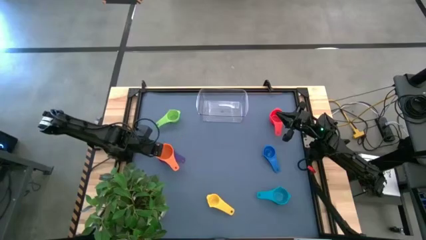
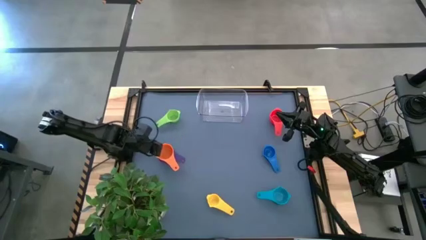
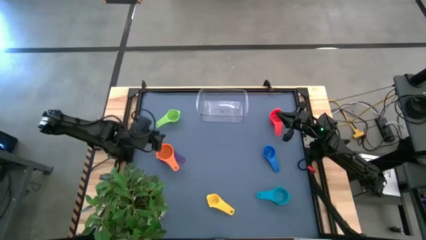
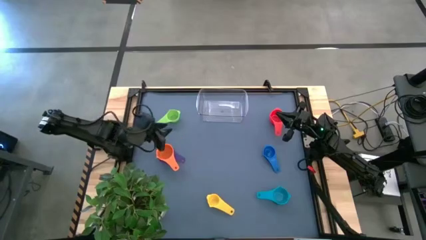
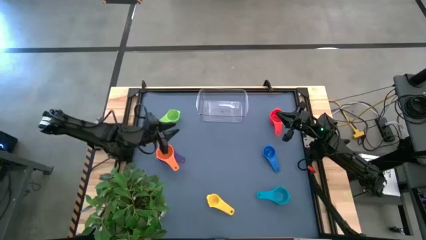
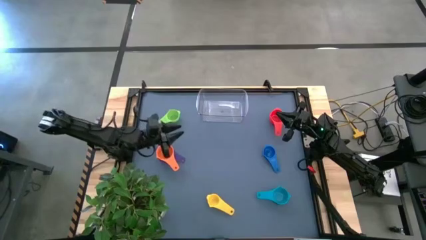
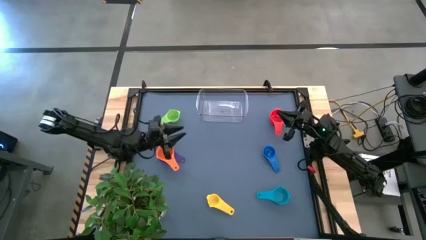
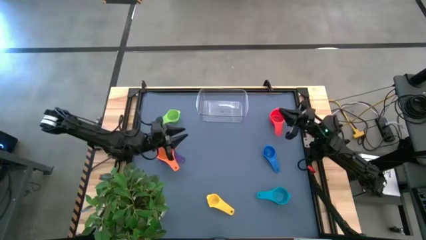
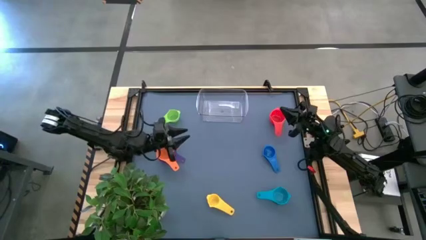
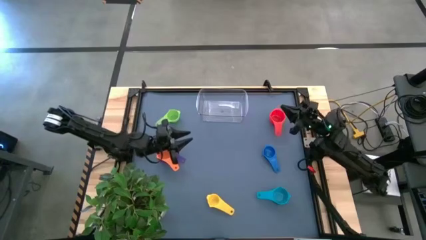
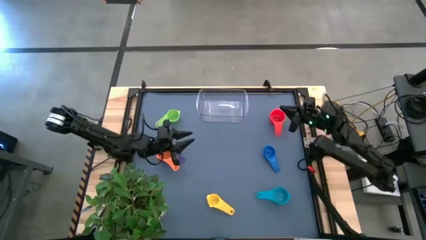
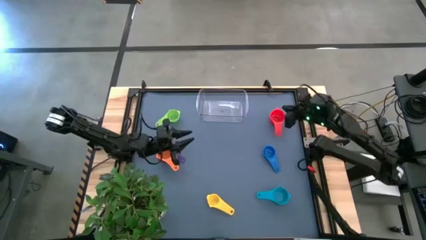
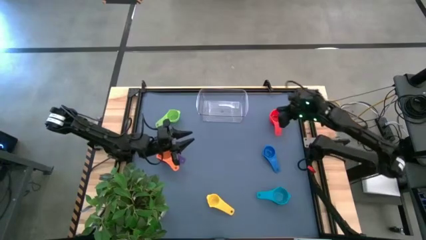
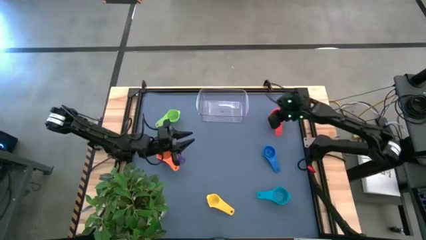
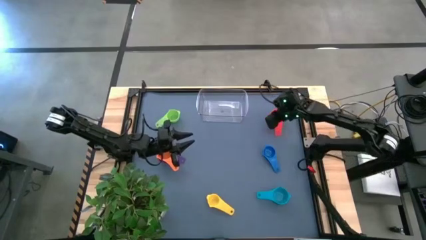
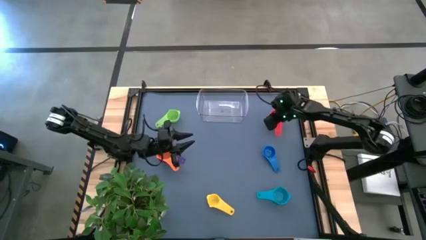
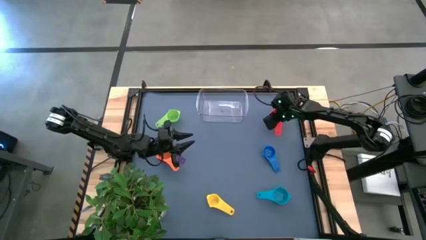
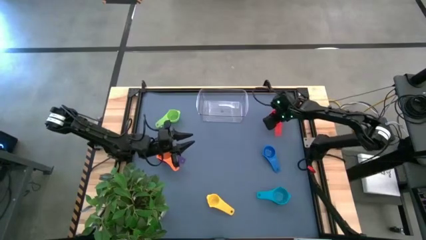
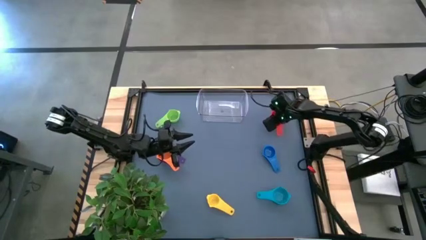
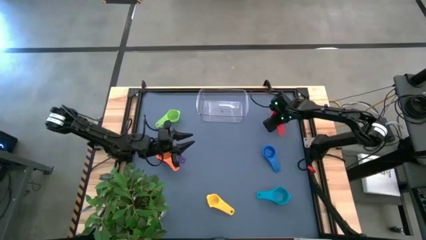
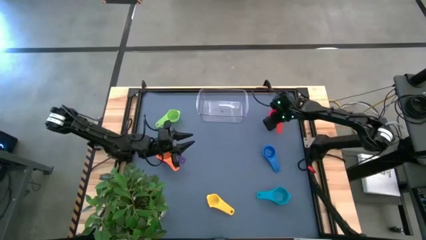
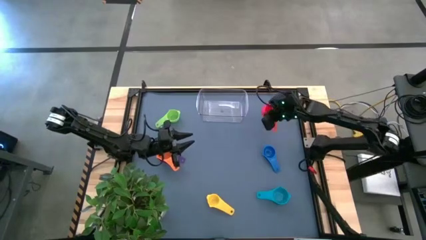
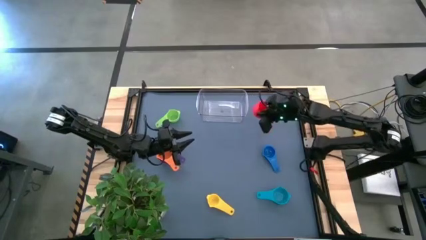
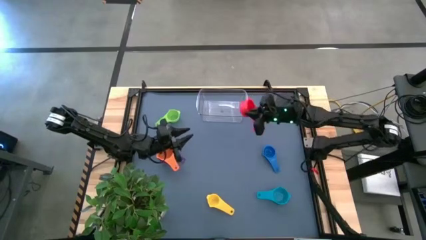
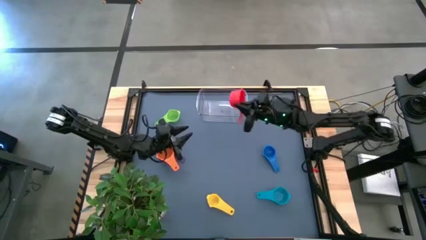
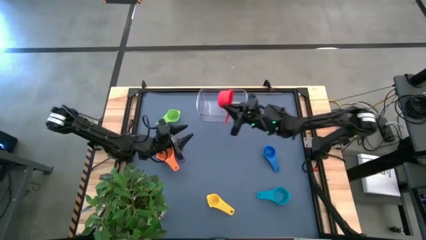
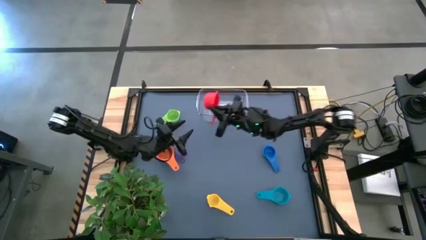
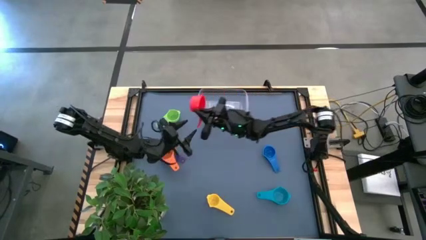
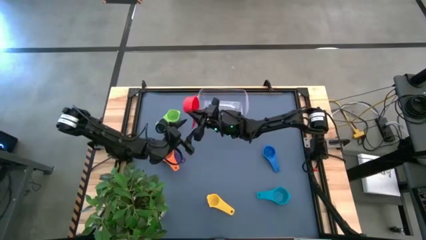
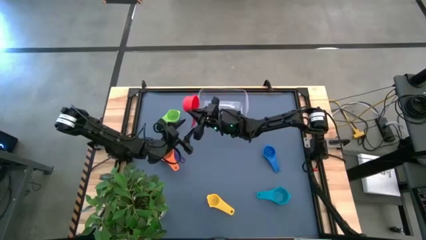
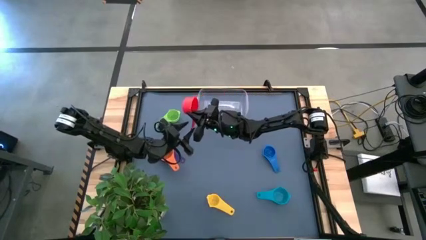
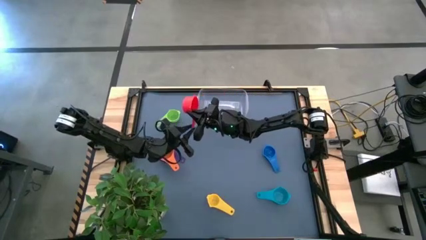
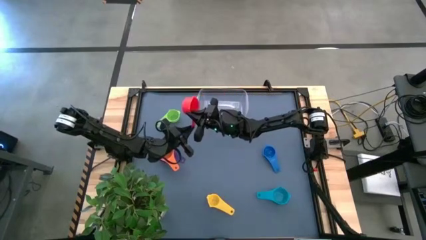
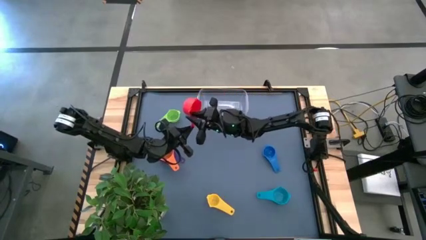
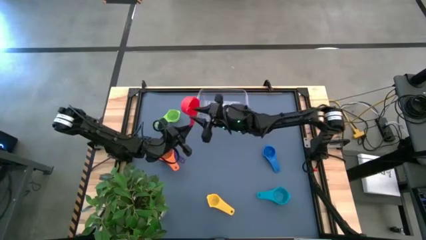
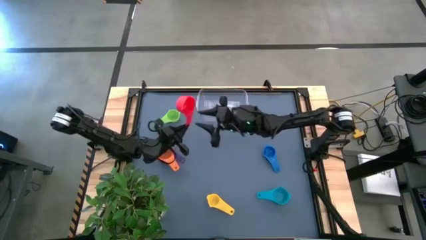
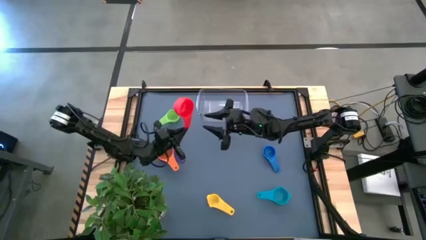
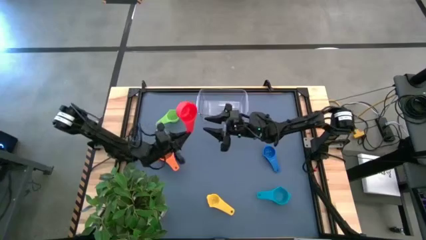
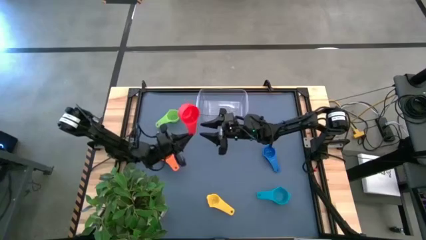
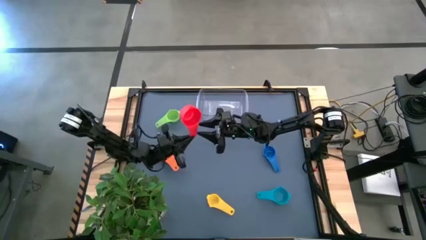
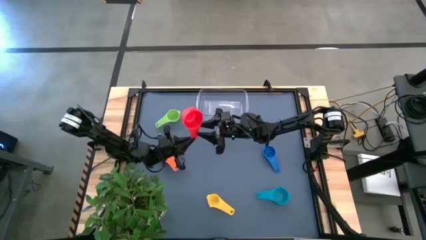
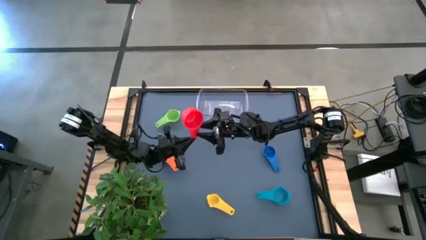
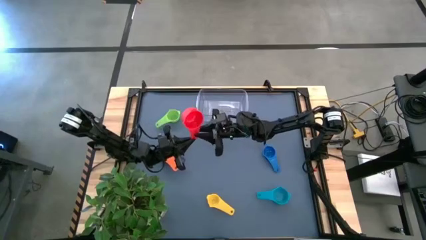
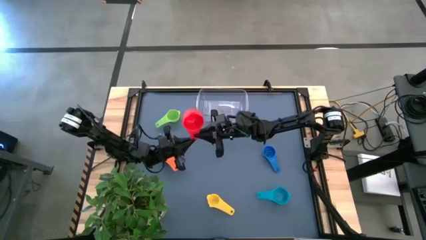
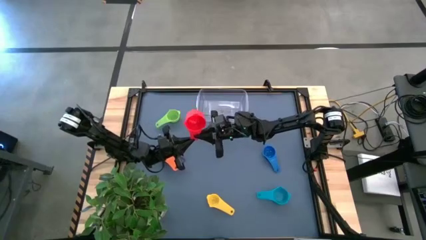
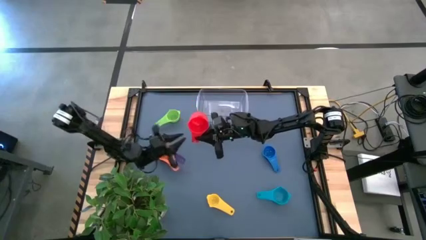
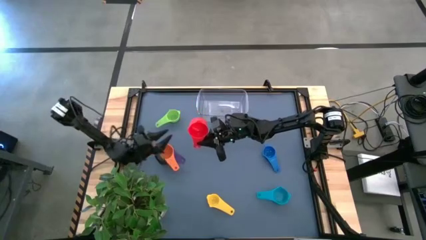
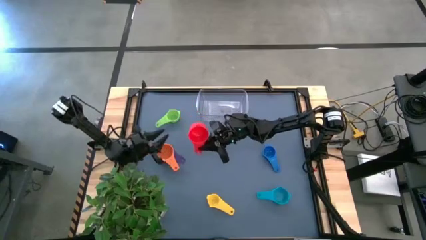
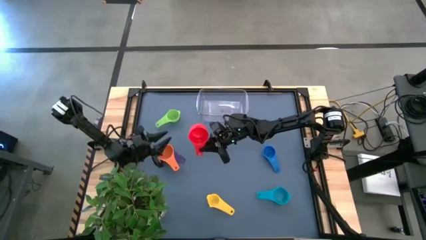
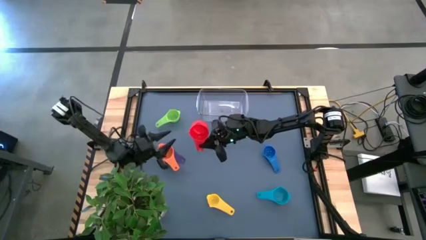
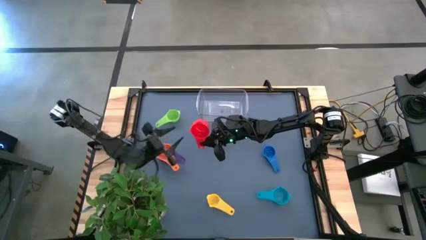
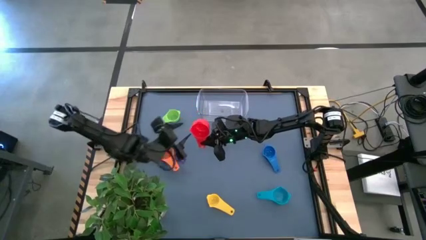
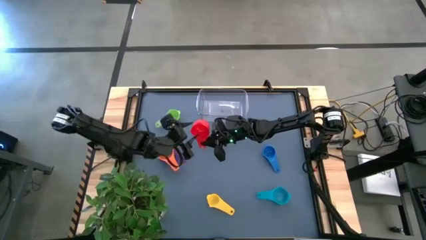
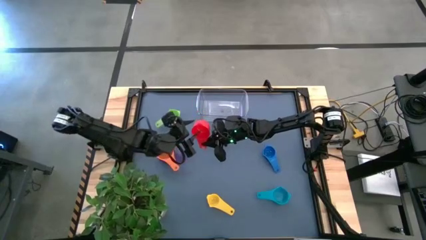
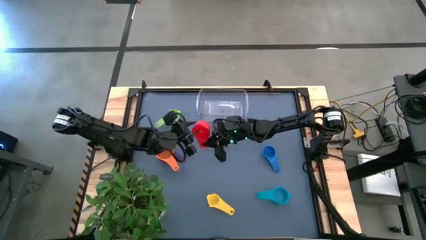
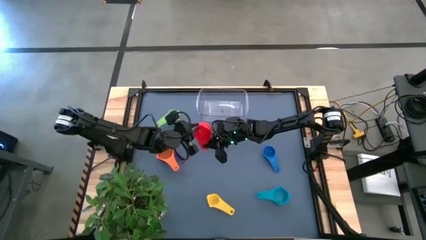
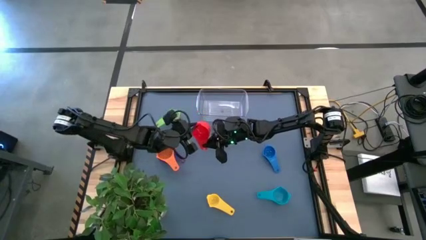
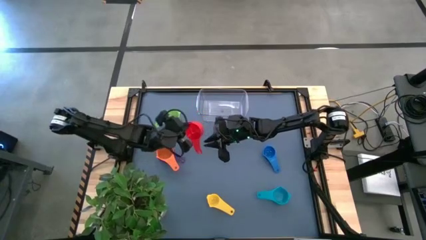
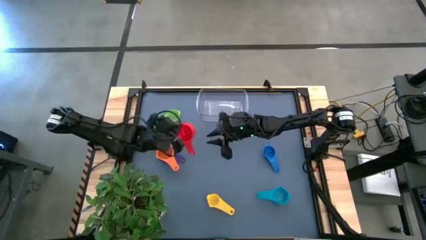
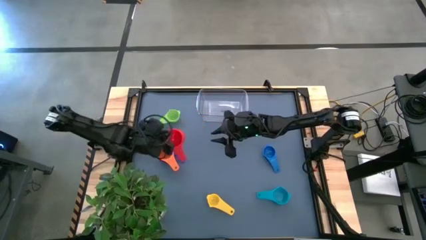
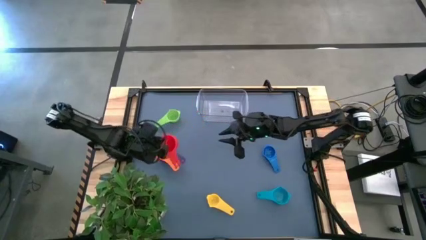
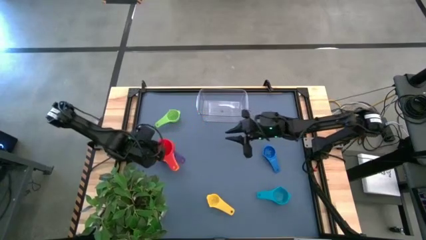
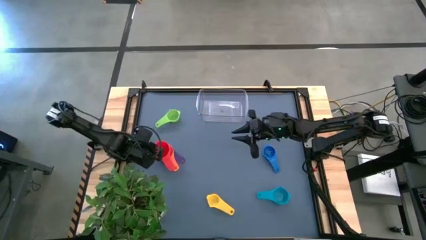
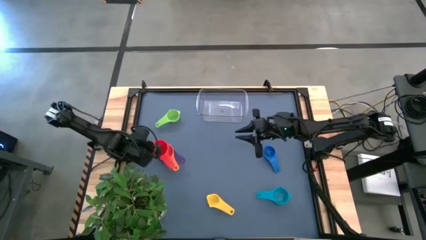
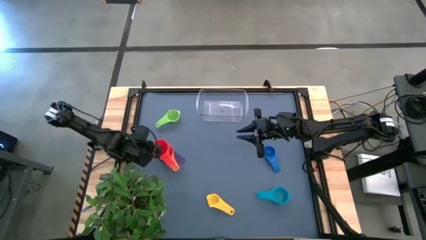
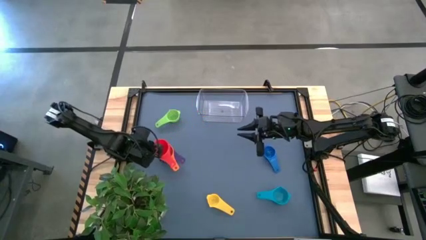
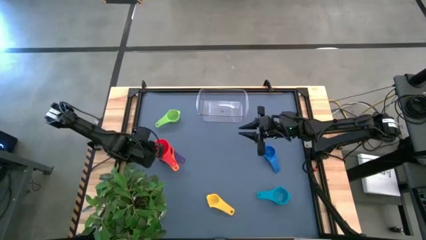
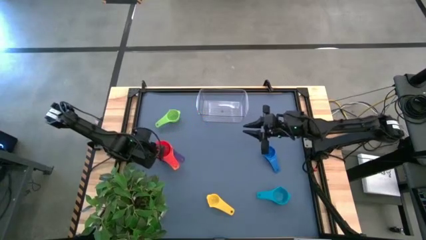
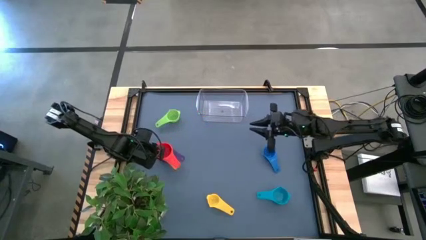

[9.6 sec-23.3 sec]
Task: Nest measuring cups in basket
Stack the red measuring cup on top of the orange measuring cup
